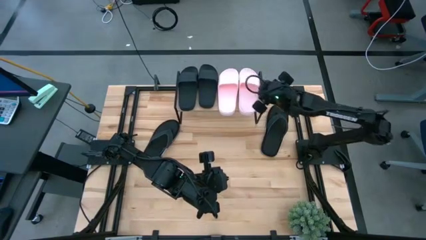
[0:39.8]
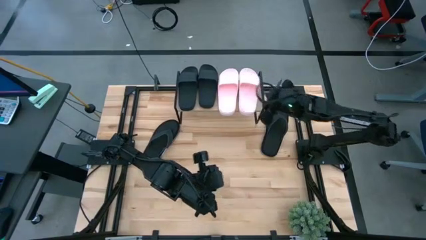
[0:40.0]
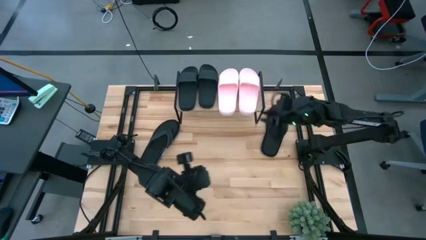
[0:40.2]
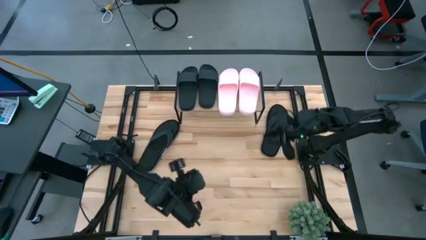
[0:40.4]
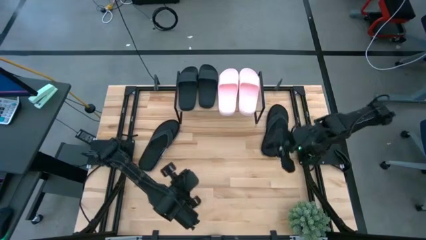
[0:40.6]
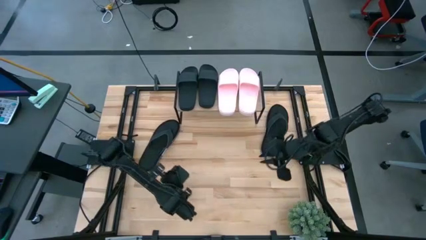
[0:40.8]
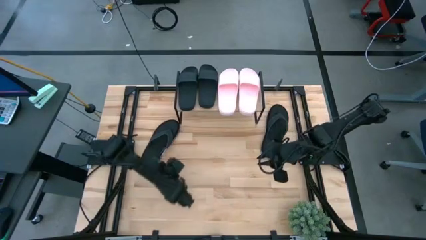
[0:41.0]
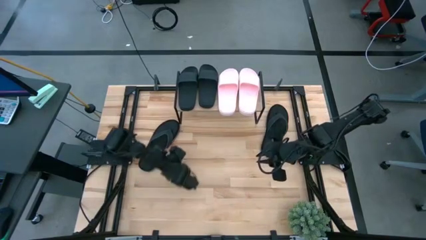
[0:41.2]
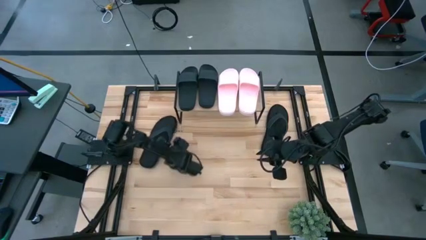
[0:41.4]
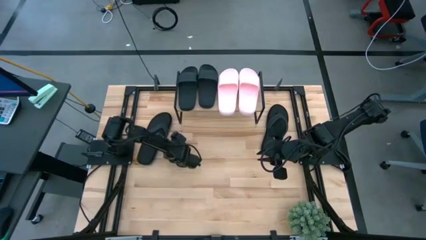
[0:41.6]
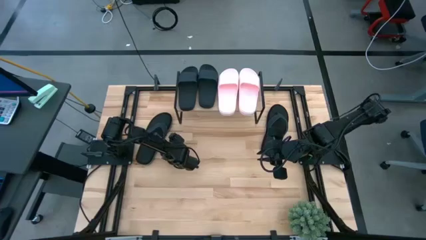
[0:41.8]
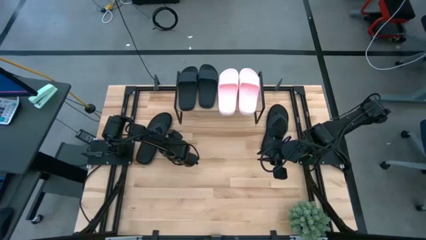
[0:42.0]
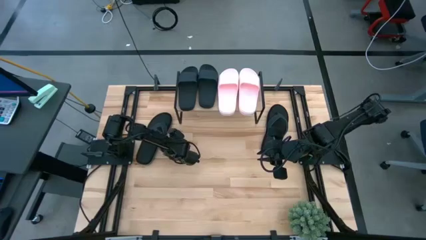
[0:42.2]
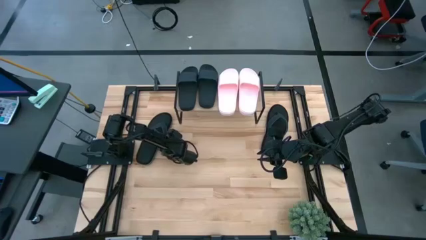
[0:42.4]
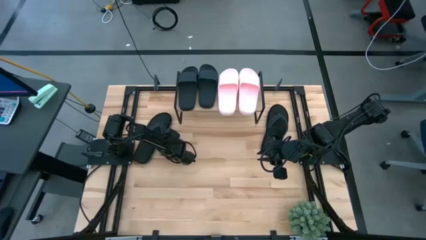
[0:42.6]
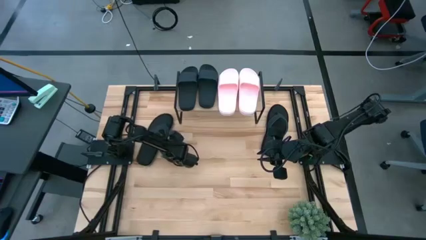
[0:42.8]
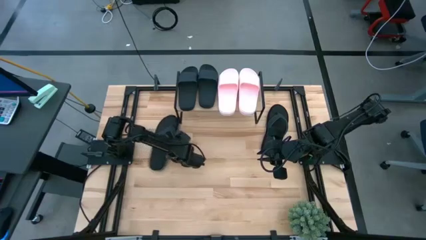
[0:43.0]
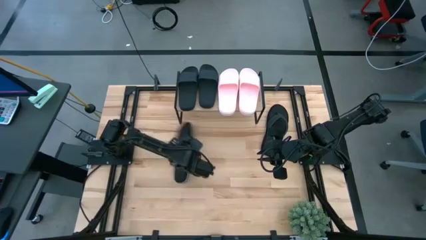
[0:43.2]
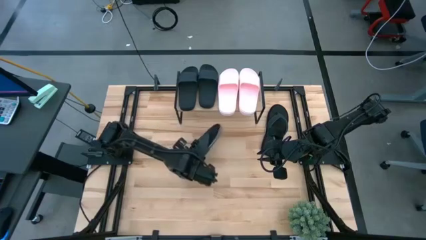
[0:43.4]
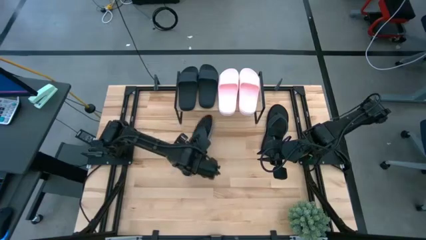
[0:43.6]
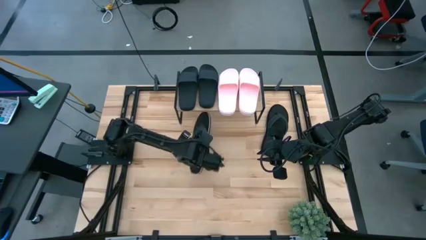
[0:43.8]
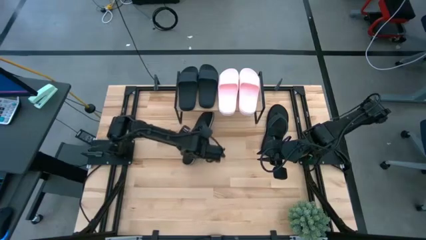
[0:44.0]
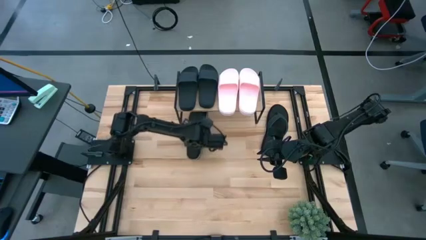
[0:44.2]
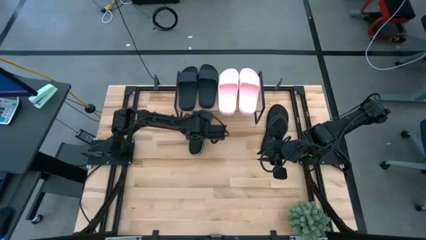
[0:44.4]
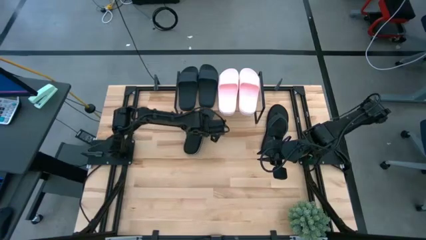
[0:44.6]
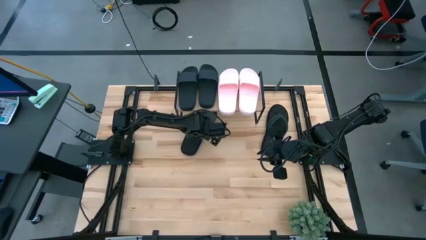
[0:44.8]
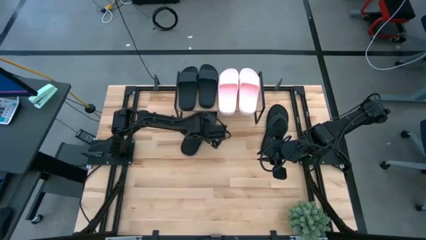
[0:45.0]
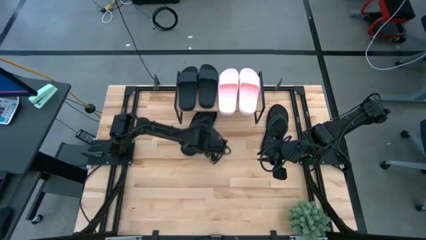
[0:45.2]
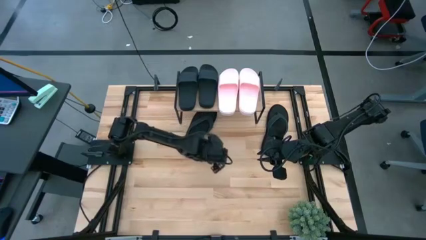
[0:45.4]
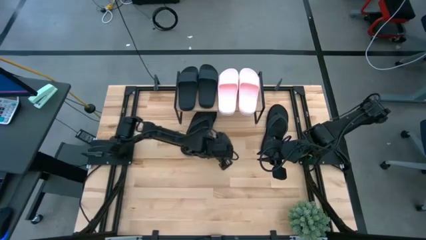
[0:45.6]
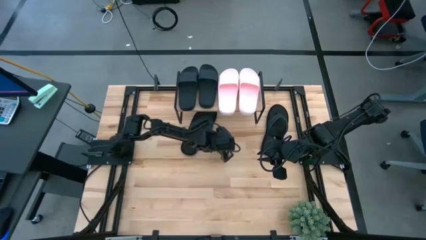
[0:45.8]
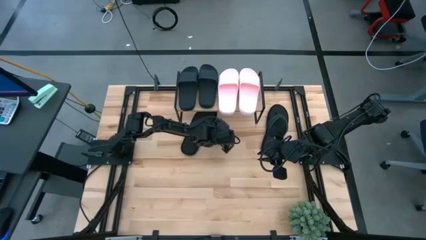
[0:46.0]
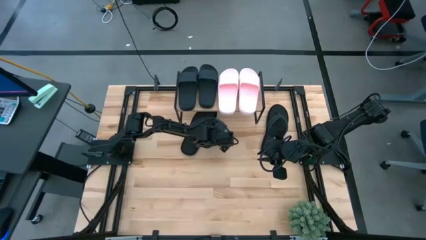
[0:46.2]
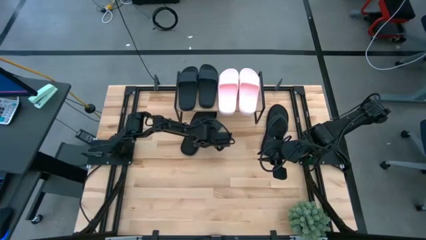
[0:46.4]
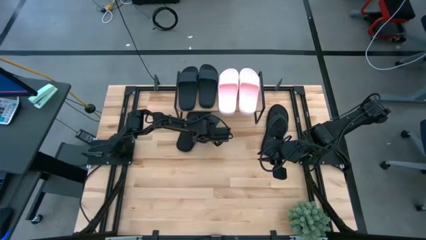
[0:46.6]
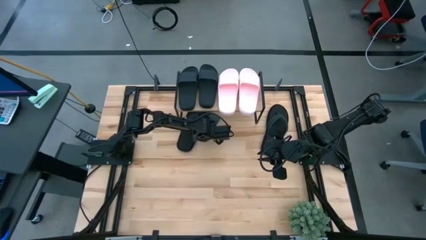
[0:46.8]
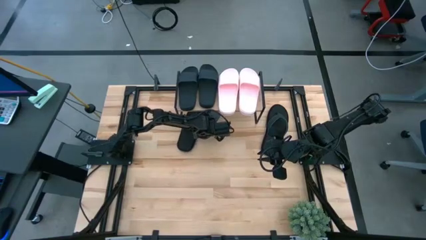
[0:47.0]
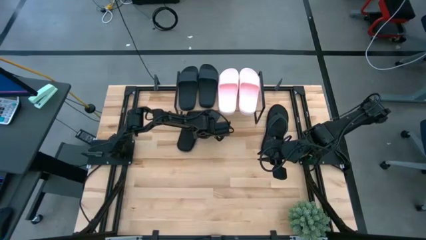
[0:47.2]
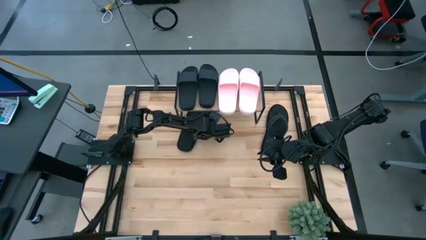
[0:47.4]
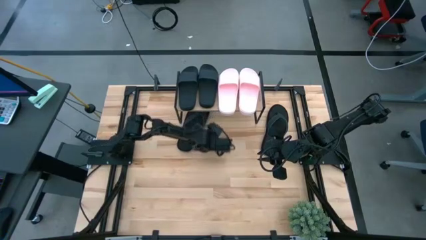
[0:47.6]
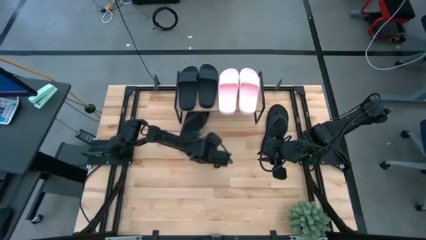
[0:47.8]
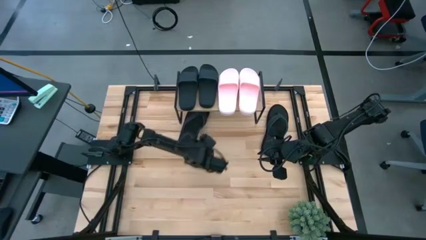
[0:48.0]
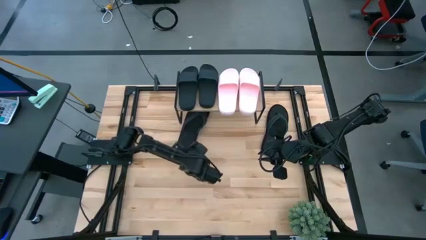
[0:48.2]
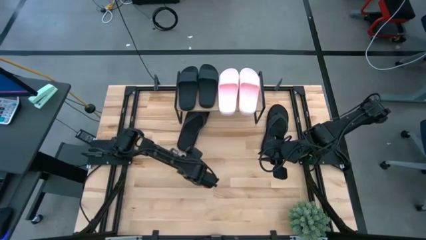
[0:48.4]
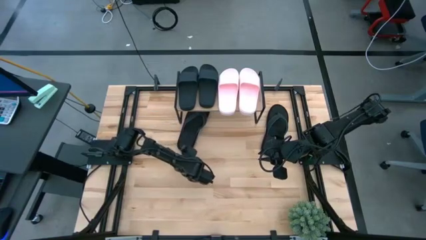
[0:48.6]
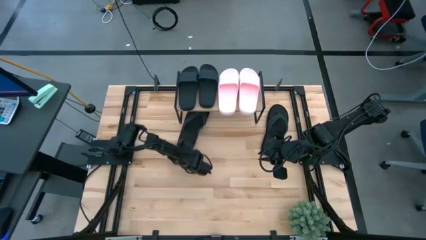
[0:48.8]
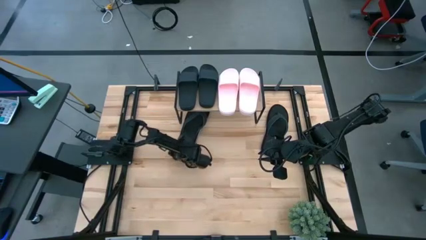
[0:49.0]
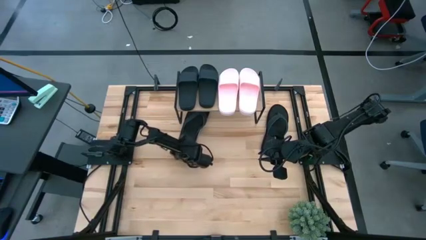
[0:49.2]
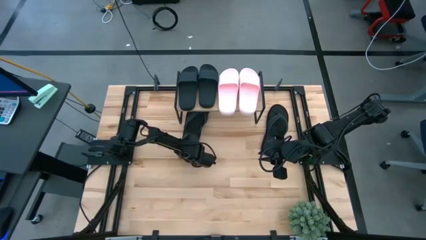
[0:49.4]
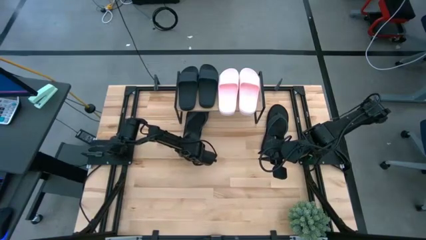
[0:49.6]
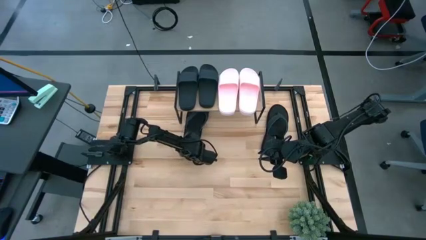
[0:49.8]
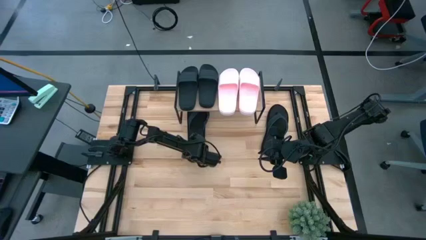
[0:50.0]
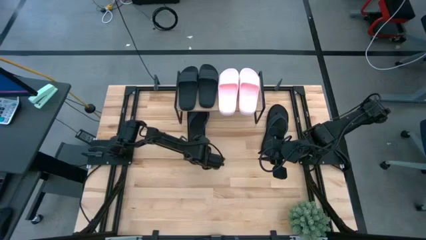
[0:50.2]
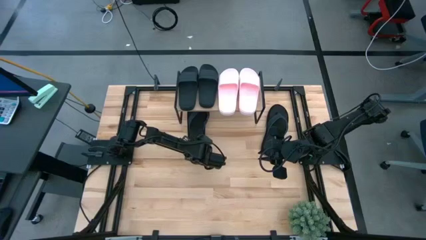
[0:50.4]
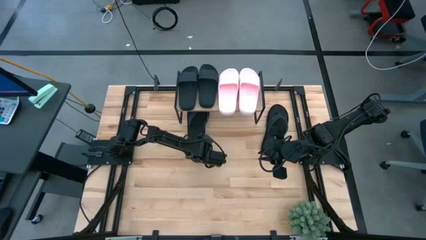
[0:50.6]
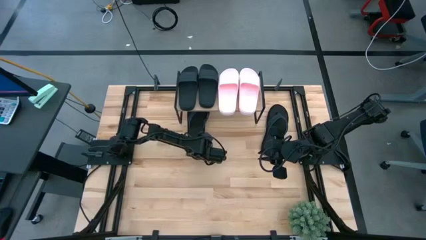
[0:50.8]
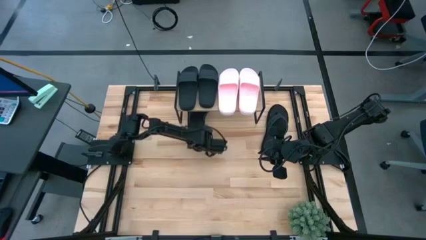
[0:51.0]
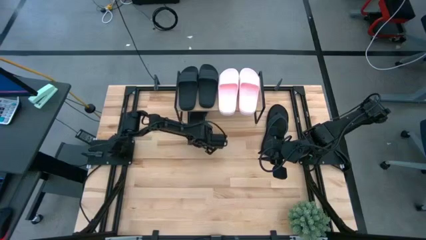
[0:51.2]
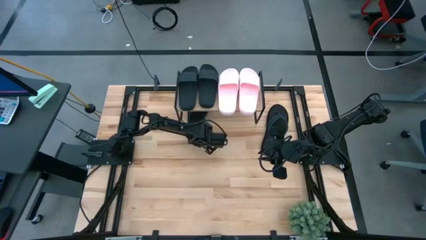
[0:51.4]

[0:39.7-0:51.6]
Task: Pick and place slides into the shelf
Put the left black slipper under the shelf
